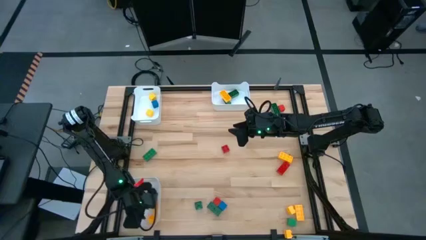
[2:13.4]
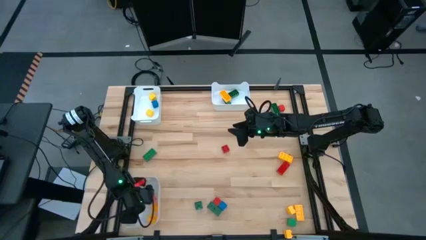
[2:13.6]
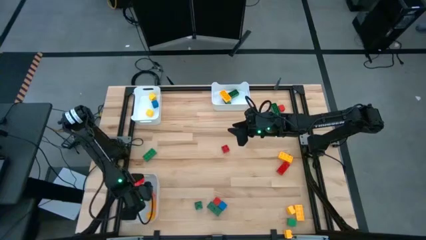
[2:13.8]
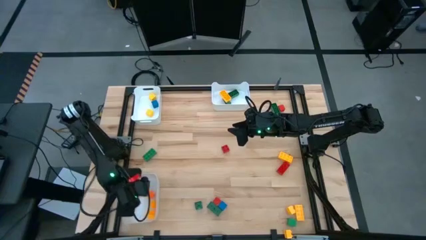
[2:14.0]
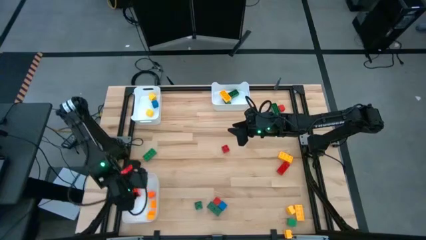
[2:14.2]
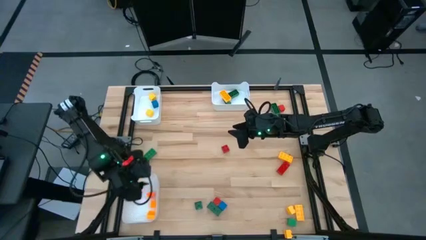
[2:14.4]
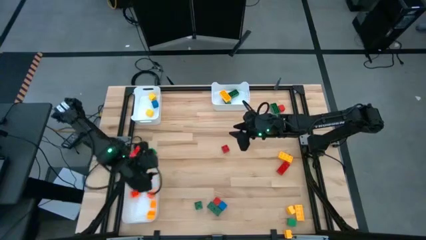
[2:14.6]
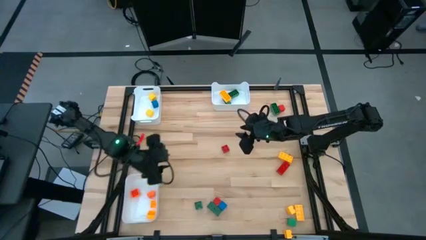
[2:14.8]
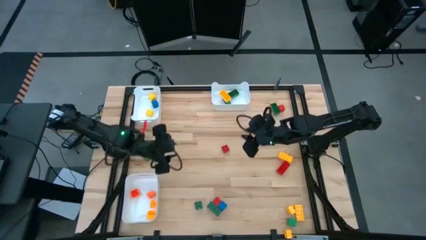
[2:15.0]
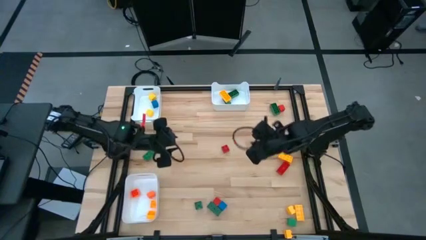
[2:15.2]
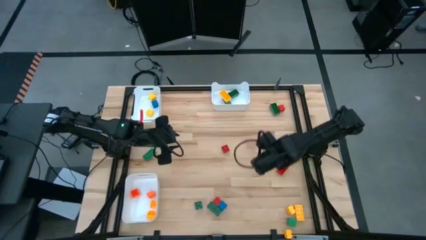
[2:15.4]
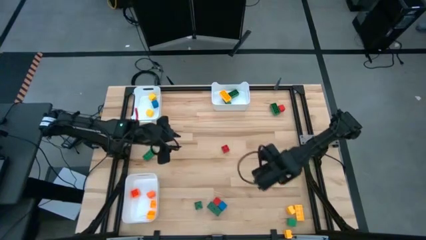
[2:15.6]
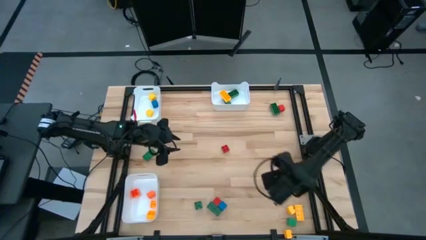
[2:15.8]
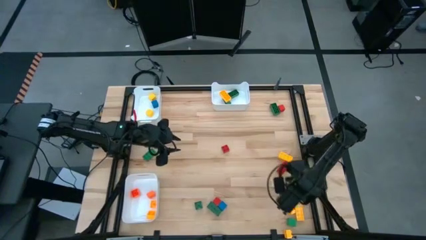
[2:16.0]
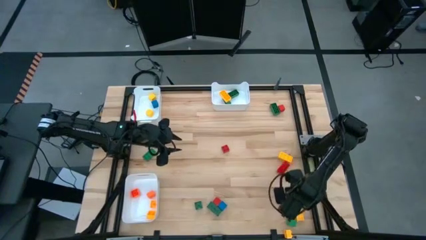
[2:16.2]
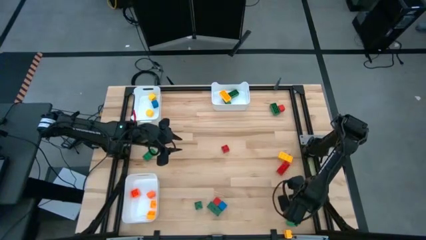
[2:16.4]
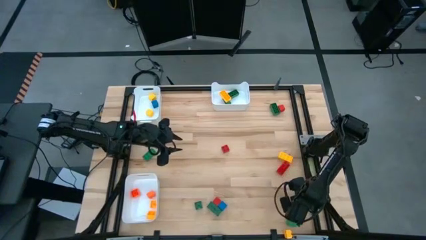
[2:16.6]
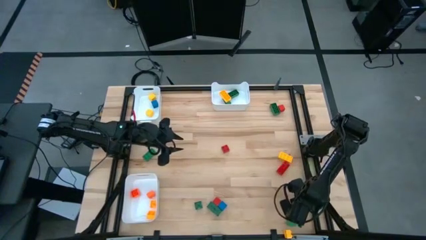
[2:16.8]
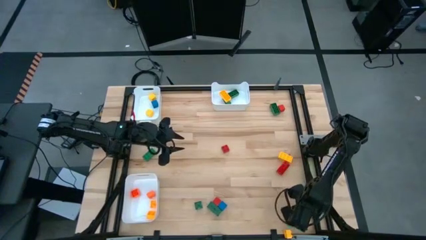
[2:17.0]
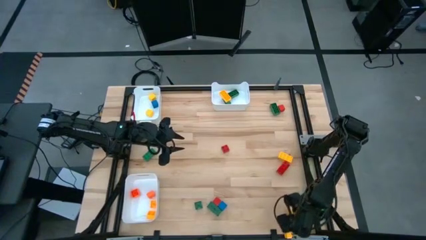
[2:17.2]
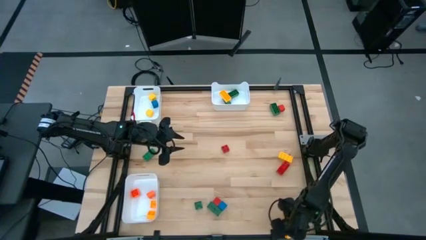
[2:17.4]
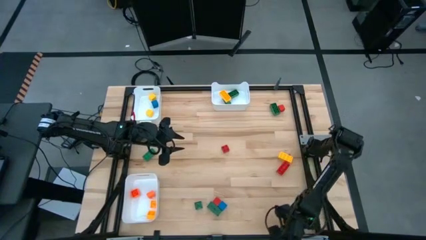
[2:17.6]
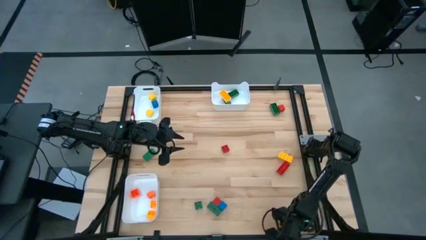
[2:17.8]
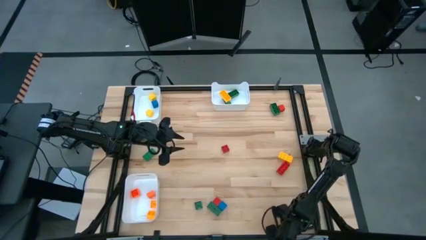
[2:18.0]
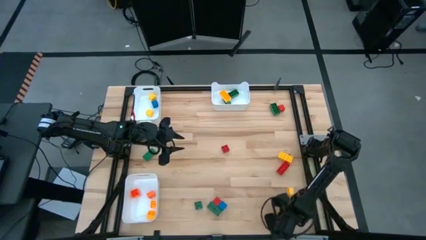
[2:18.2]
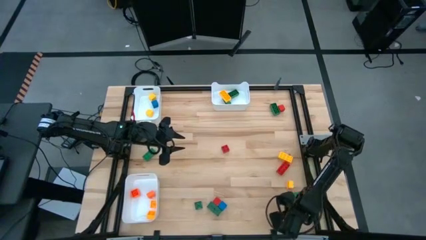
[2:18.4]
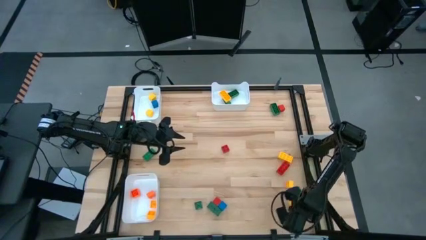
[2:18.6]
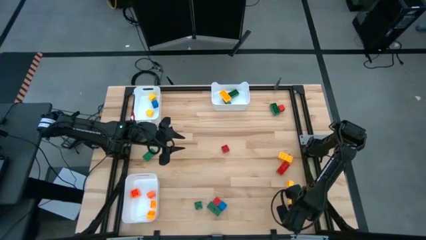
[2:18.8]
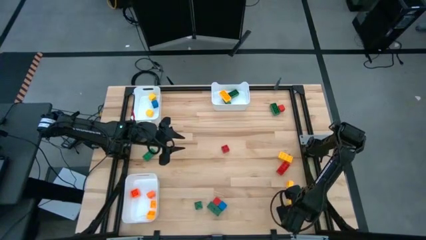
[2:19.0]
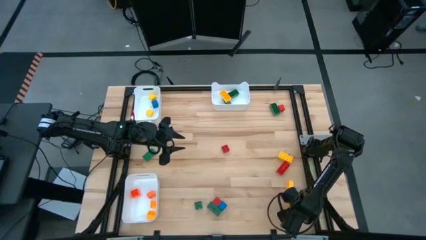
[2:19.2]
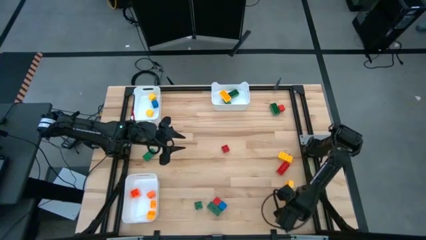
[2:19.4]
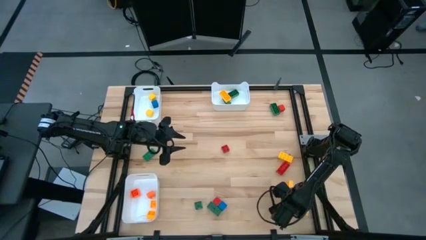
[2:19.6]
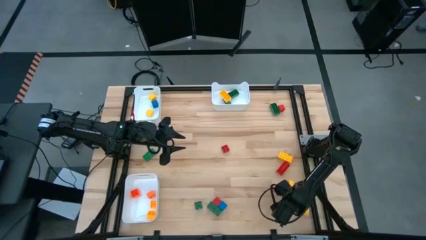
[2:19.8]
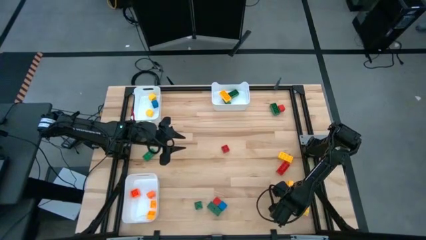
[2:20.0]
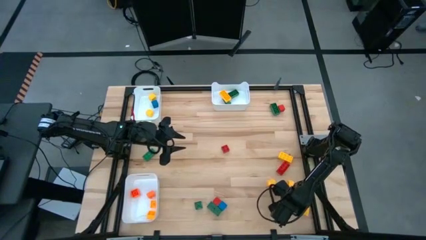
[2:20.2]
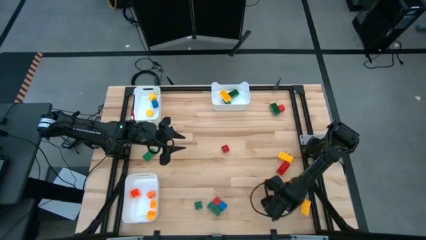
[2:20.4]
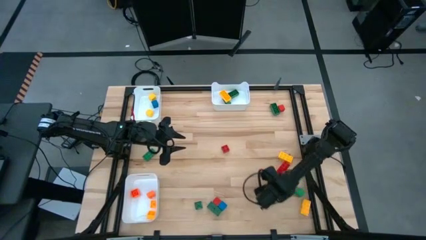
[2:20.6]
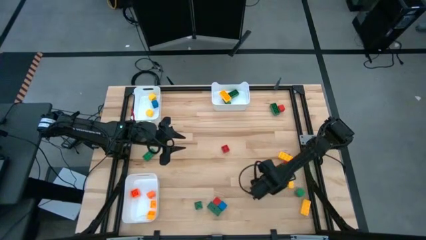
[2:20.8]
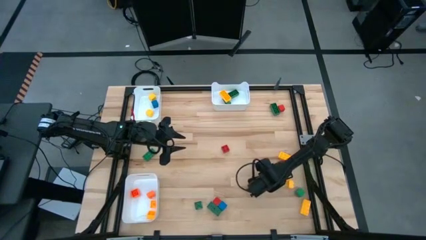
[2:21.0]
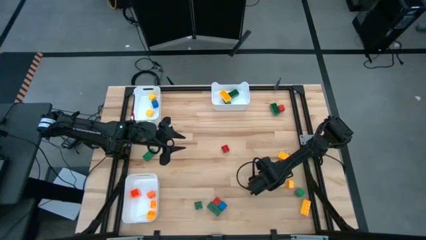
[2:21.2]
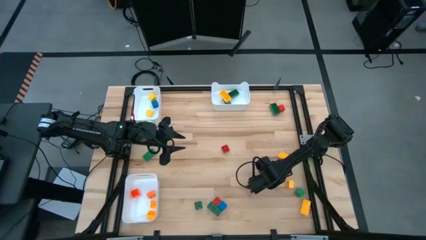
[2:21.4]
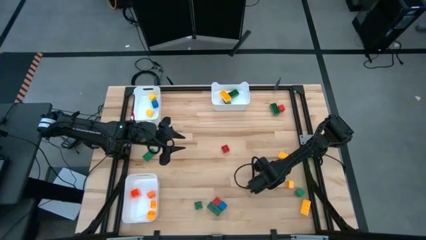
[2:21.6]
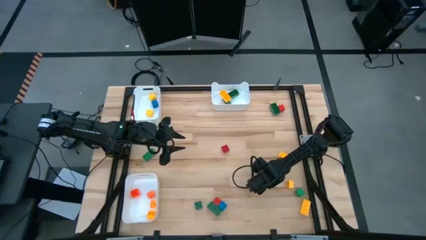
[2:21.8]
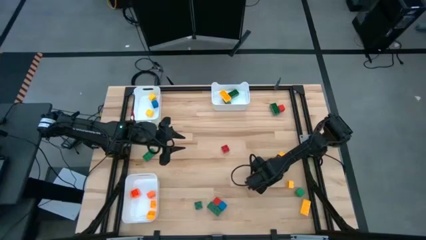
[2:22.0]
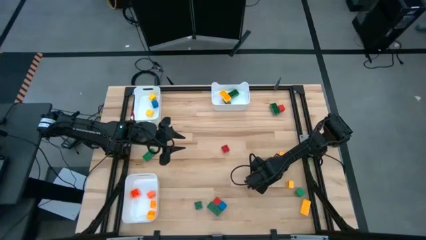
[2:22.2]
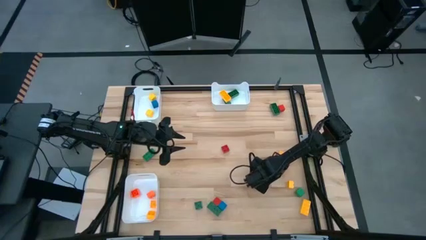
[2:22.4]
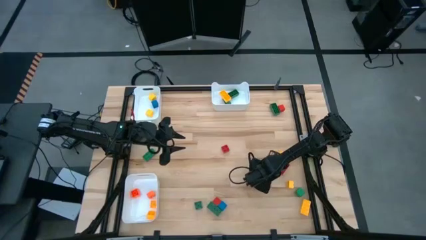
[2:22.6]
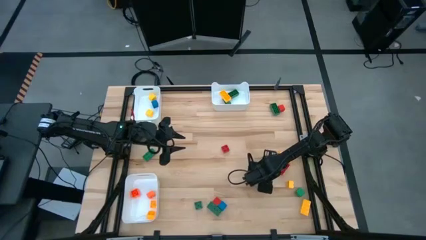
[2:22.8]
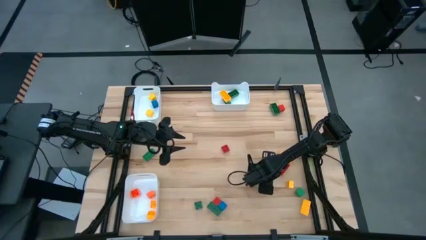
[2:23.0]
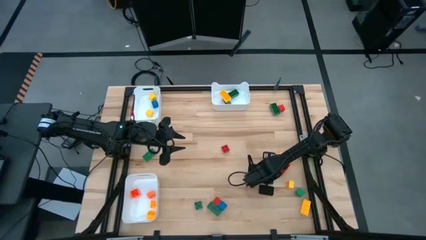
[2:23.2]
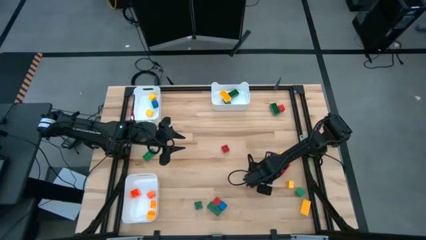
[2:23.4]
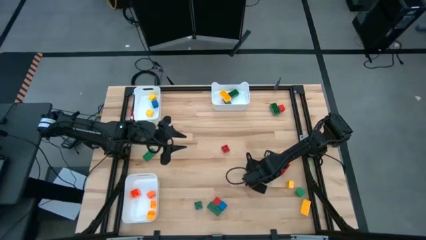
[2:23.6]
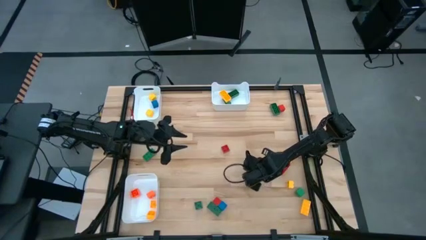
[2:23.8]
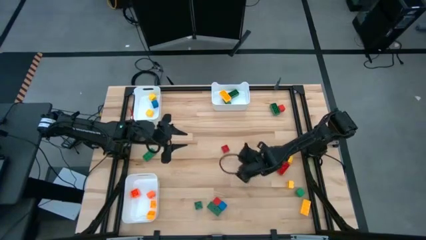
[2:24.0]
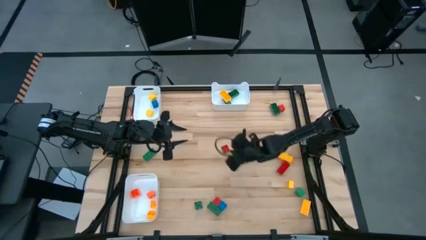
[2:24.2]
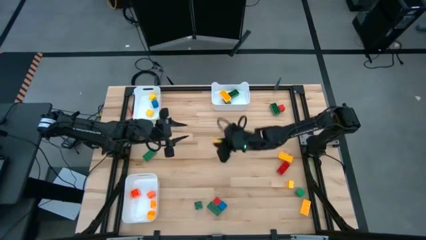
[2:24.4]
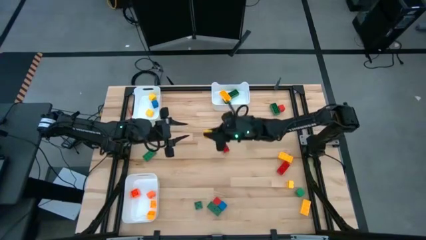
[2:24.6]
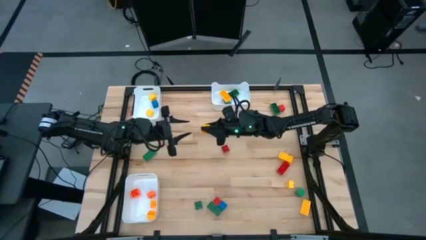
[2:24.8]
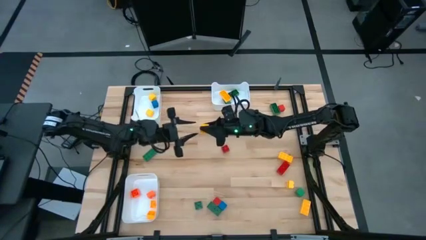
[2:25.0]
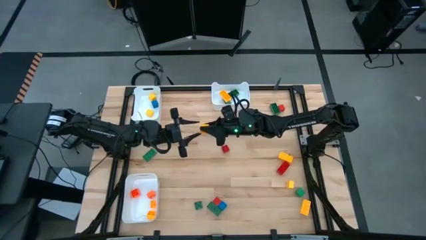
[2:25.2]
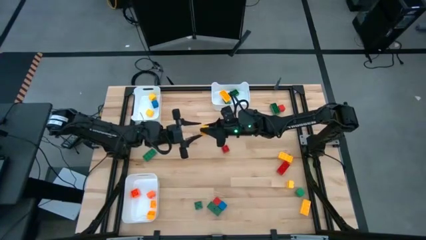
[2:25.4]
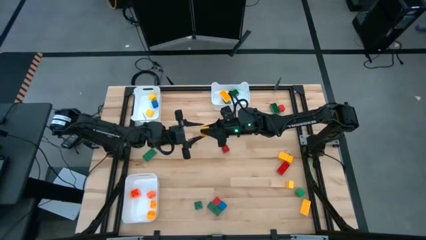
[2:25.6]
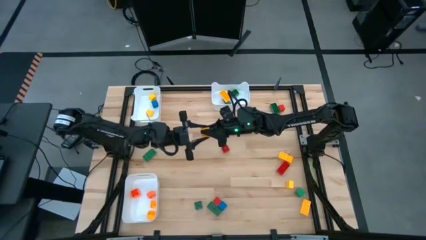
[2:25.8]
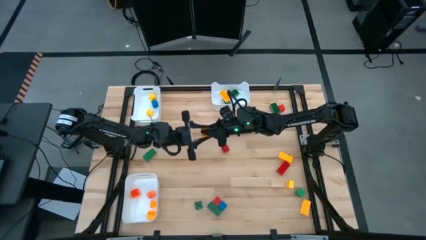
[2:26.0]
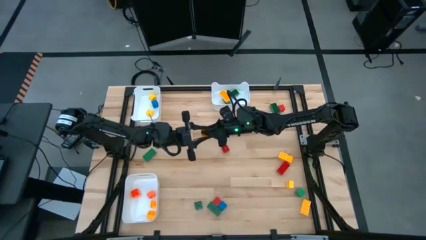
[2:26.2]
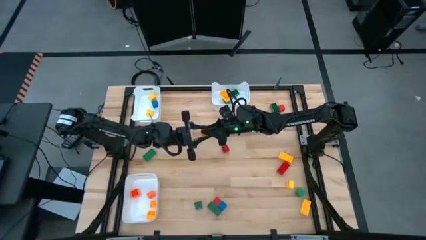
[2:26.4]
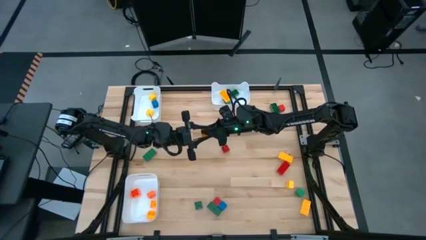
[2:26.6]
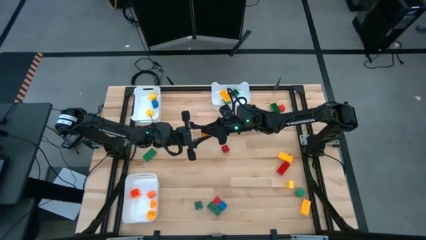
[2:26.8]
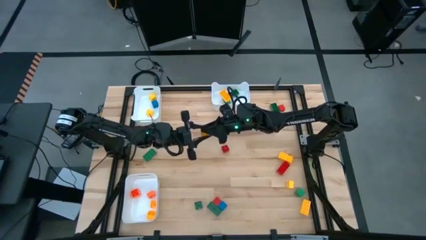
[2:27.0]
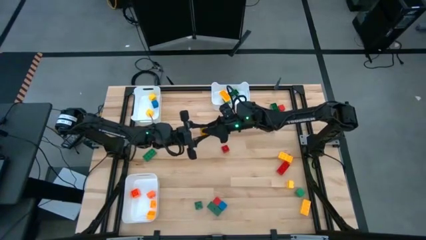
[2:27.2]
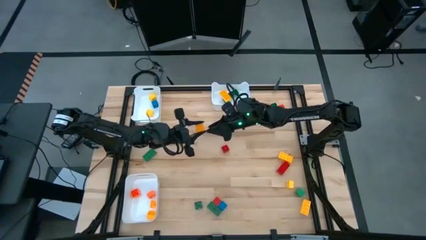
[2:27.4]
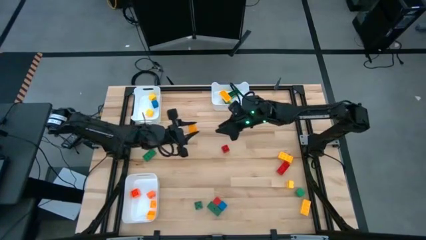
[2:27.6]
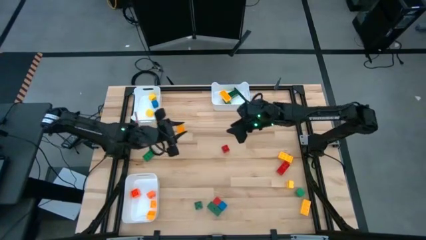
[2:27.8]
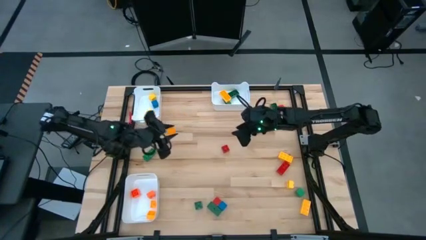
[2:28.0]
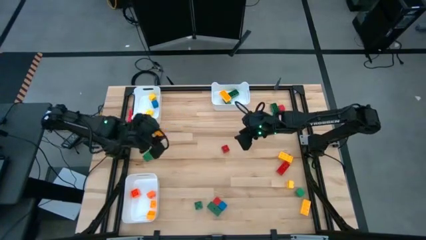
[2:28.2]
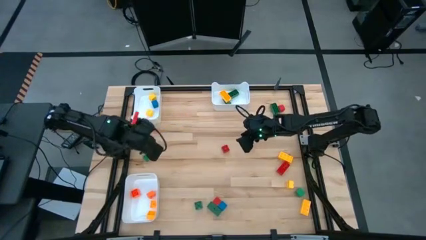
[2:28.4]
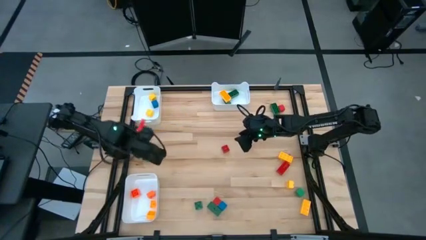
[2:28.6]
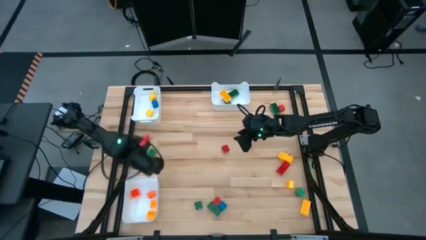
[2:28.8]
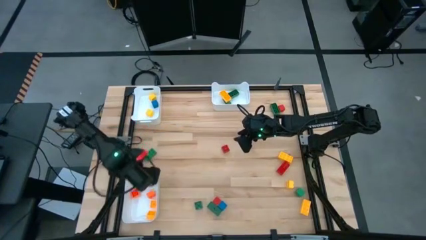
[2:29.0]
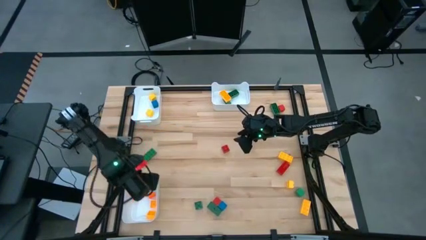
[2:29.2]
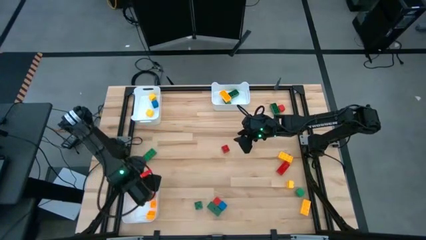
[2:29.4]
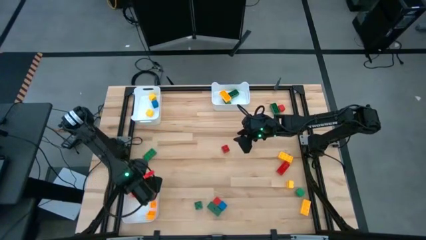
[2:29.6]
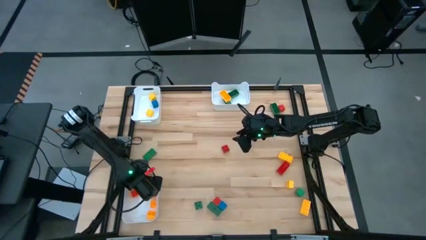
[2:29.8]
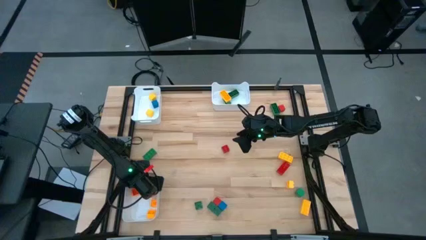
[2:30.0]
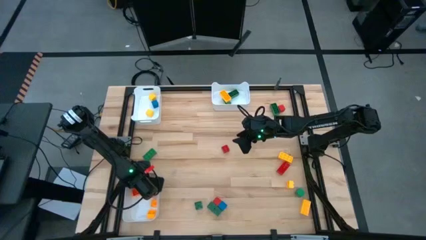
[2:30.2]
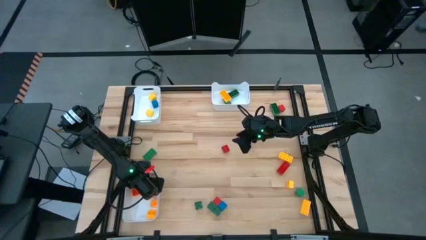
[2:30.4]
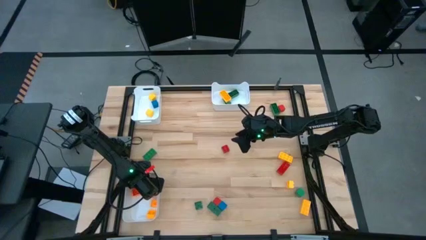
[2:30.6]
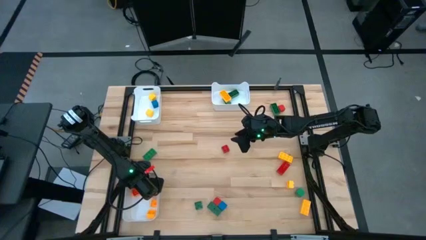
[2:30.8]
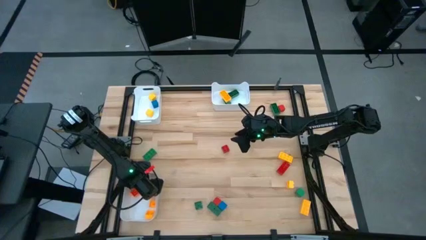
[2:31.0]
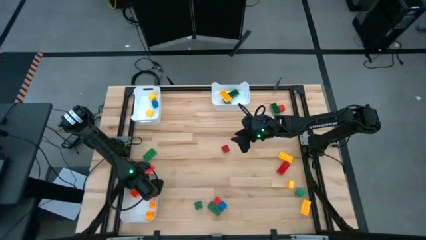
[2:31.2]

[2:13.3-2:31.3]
Task: Sort blocks by size
Put the yellow 4 stud game piece into the bottom white bin
